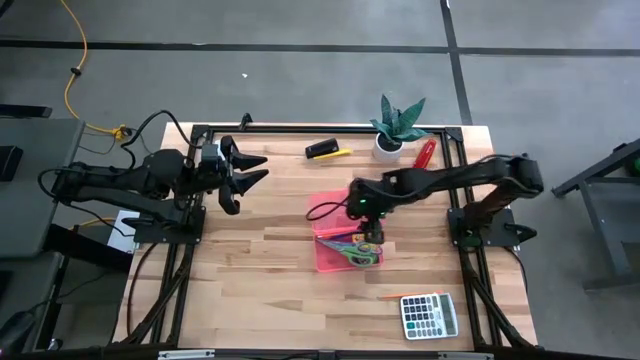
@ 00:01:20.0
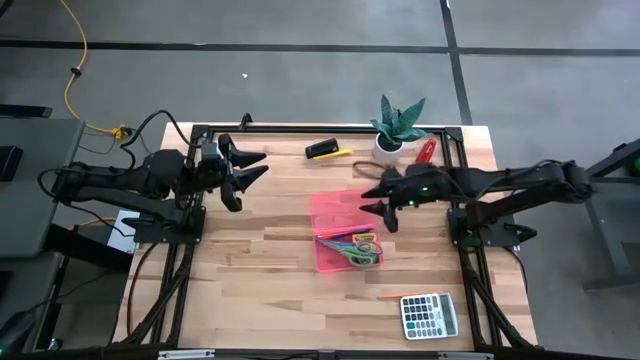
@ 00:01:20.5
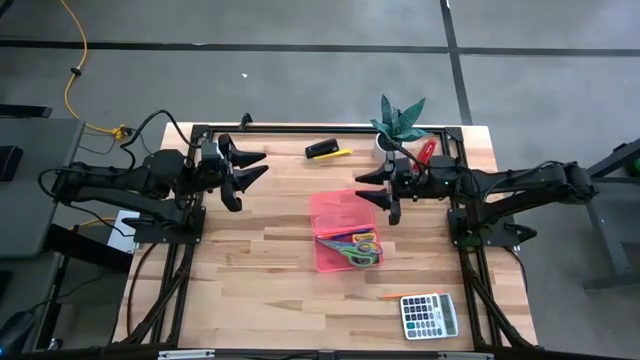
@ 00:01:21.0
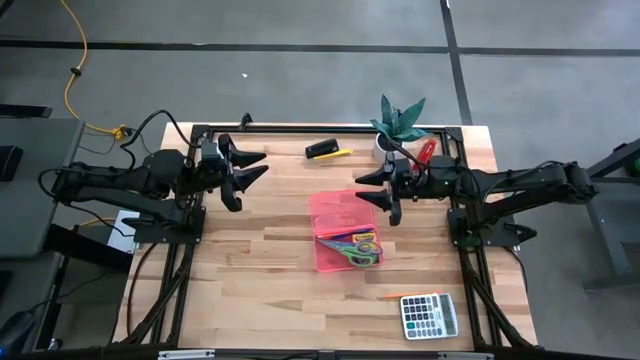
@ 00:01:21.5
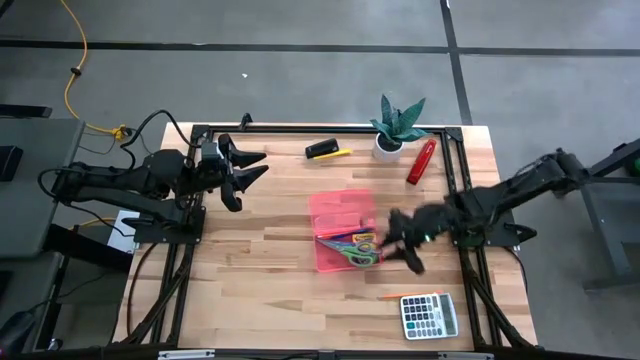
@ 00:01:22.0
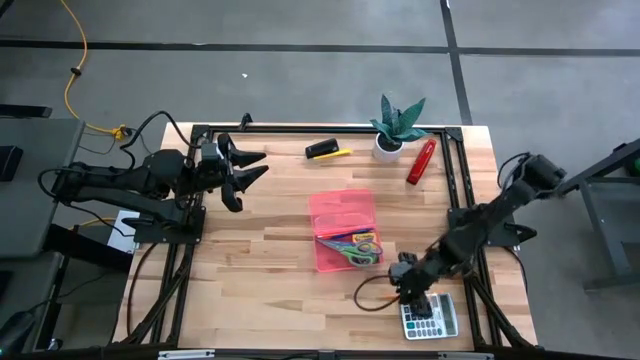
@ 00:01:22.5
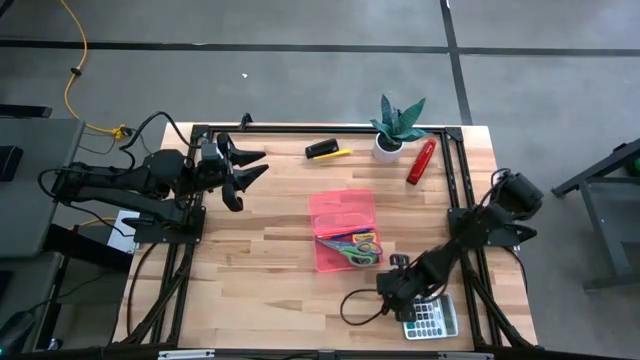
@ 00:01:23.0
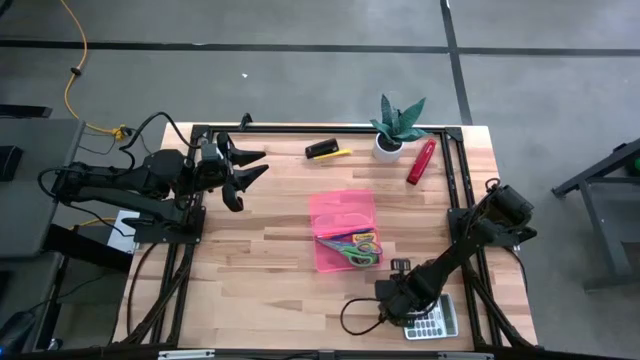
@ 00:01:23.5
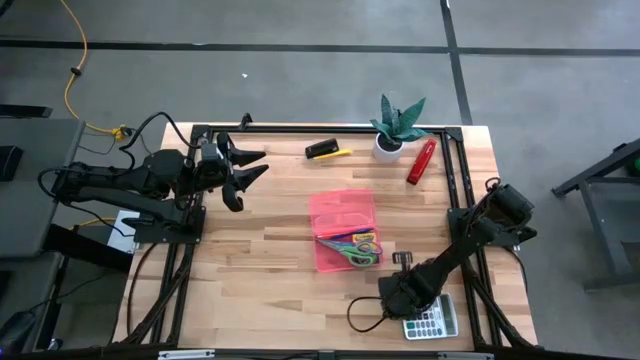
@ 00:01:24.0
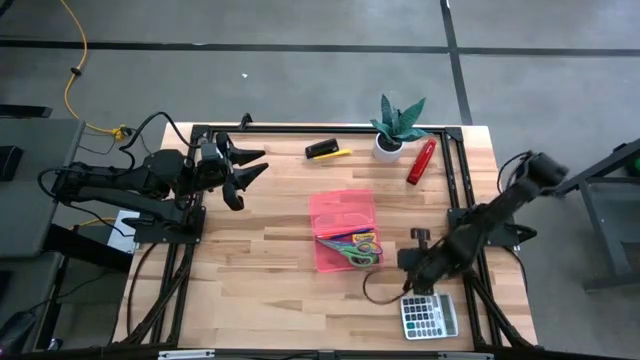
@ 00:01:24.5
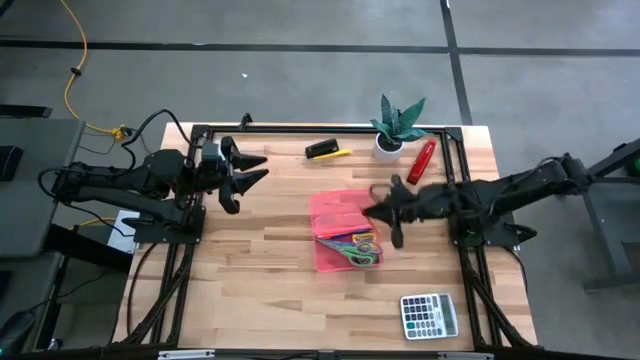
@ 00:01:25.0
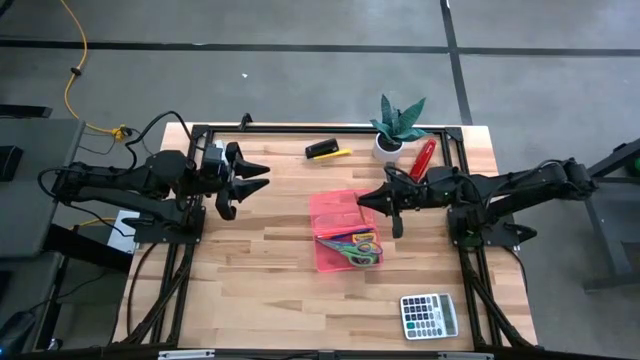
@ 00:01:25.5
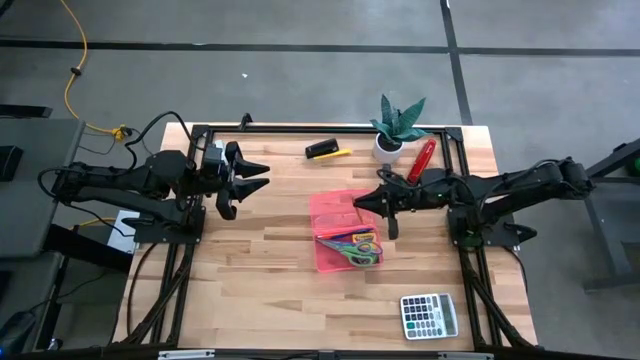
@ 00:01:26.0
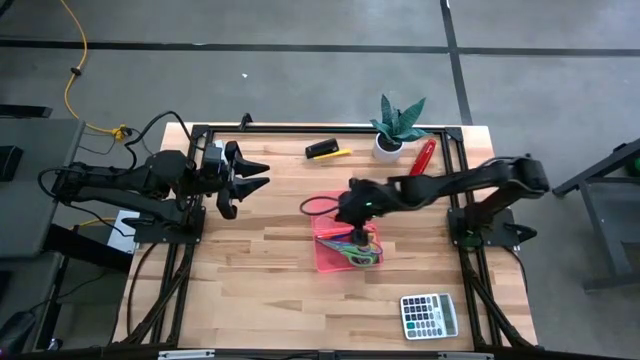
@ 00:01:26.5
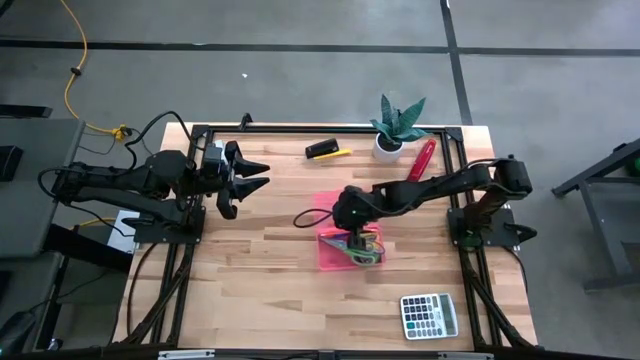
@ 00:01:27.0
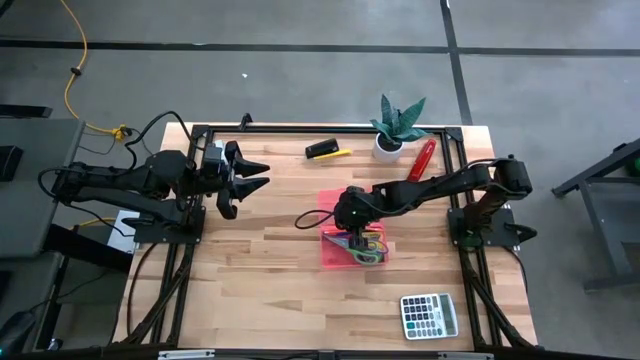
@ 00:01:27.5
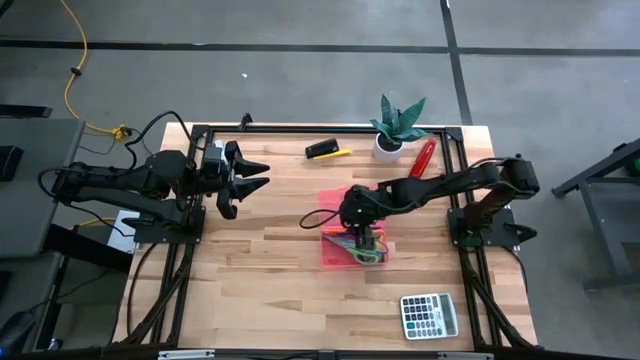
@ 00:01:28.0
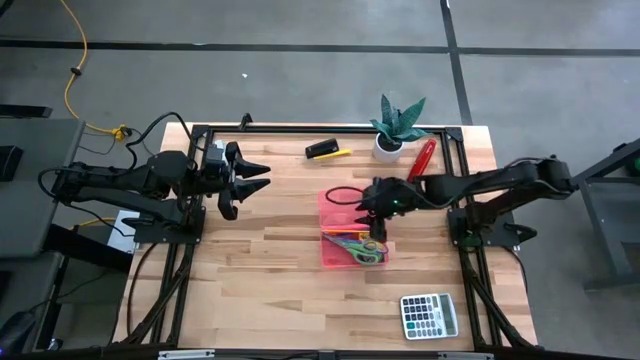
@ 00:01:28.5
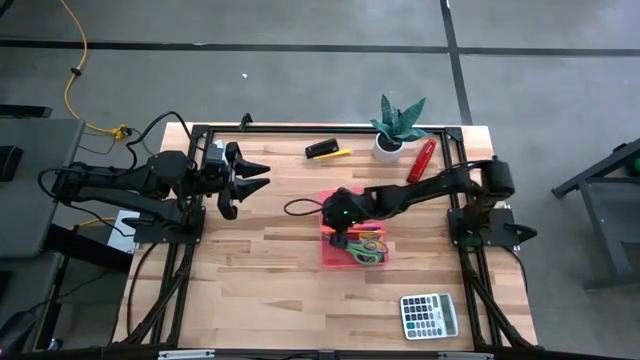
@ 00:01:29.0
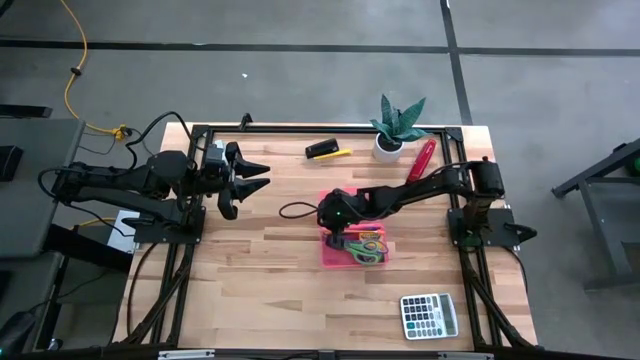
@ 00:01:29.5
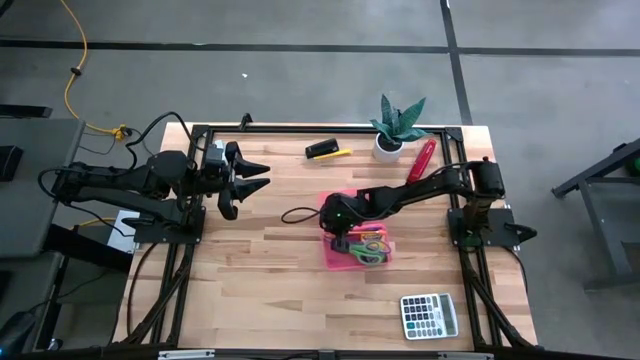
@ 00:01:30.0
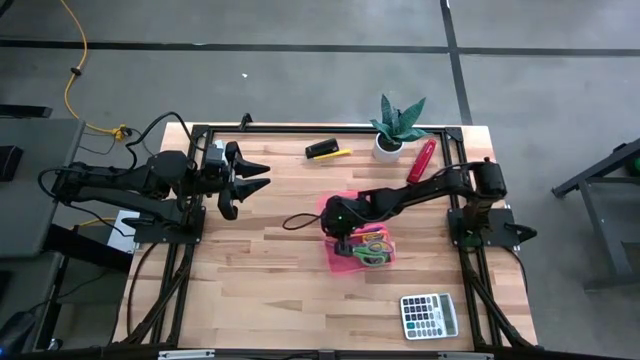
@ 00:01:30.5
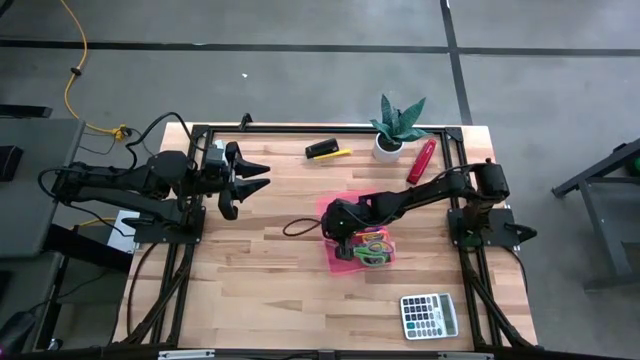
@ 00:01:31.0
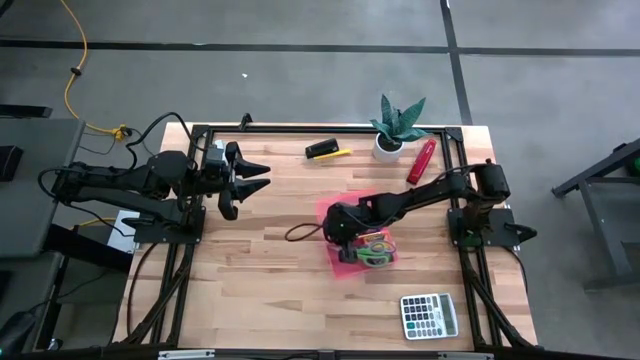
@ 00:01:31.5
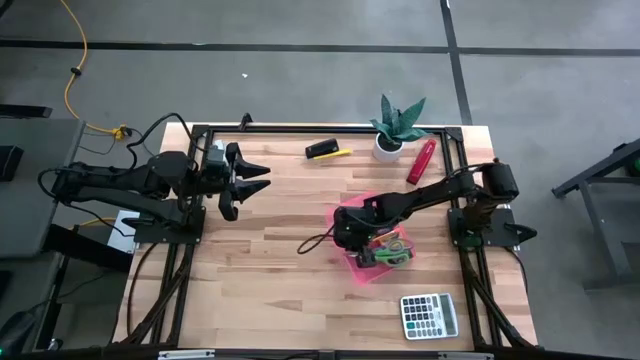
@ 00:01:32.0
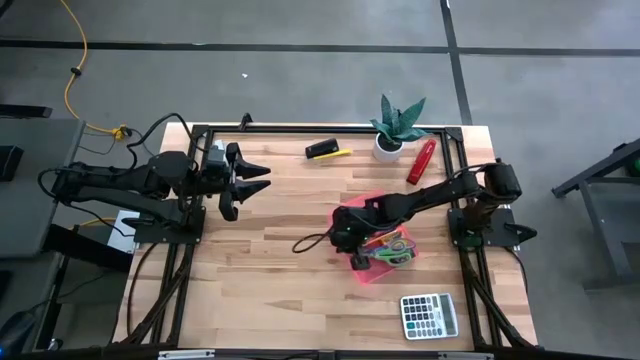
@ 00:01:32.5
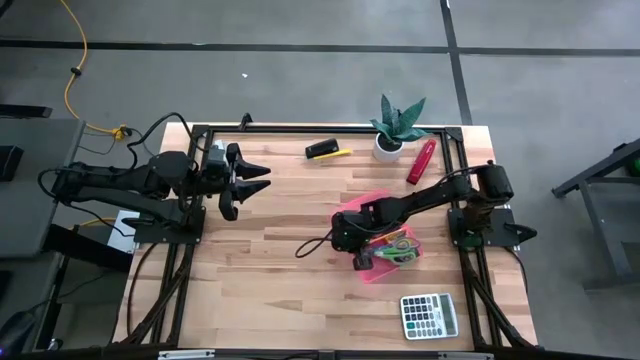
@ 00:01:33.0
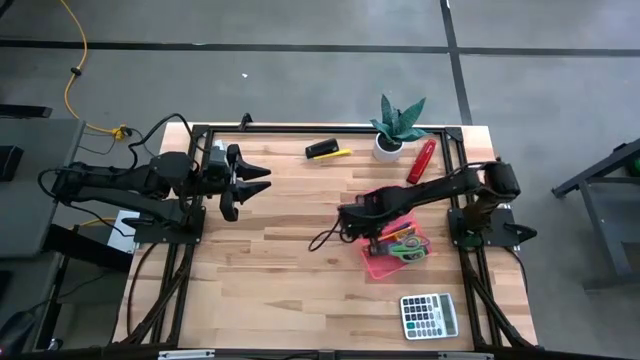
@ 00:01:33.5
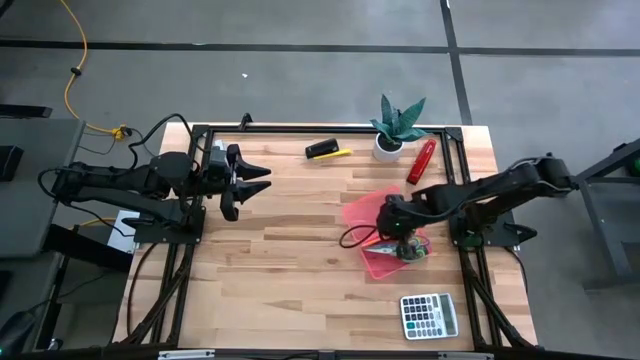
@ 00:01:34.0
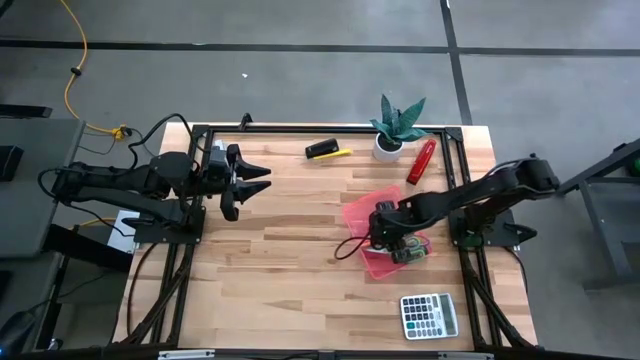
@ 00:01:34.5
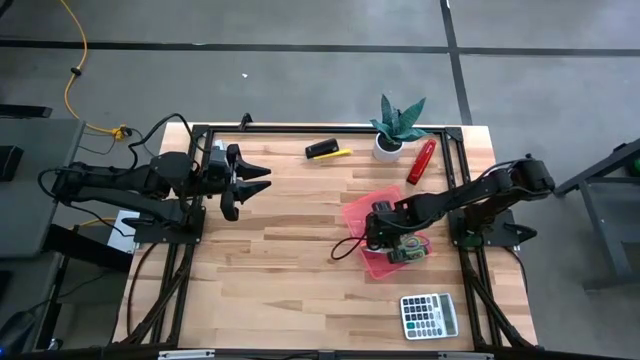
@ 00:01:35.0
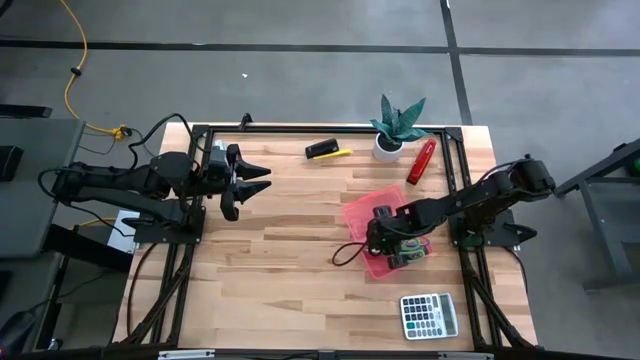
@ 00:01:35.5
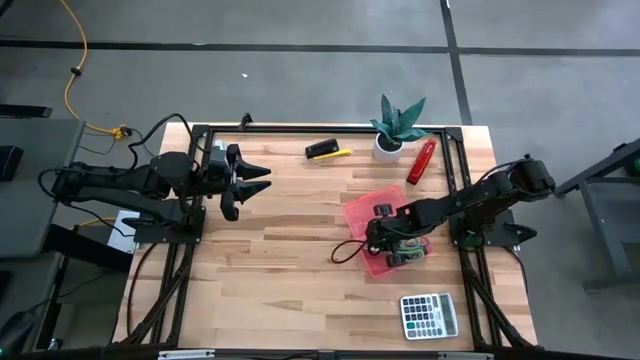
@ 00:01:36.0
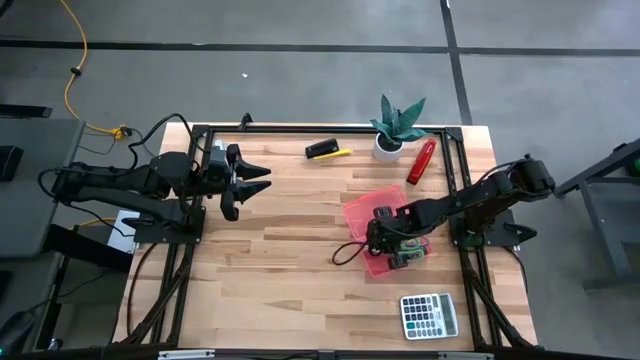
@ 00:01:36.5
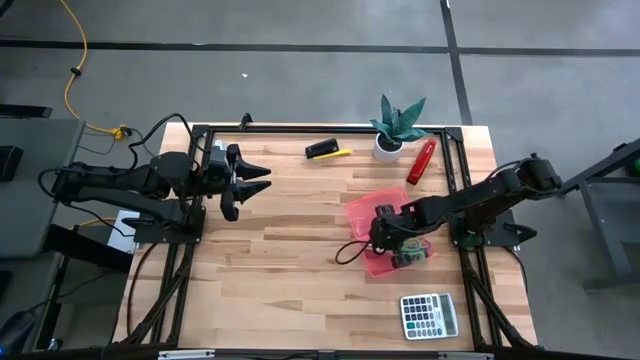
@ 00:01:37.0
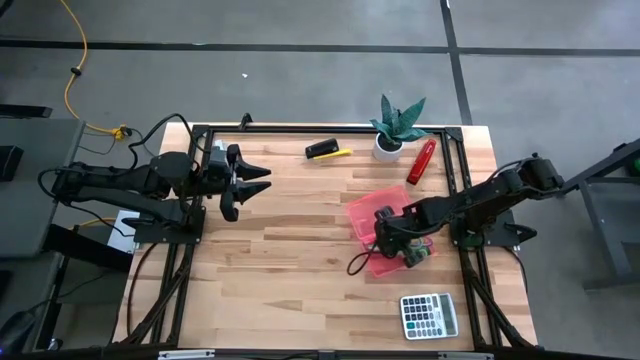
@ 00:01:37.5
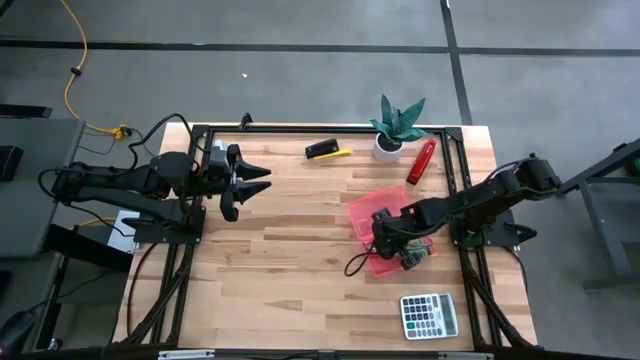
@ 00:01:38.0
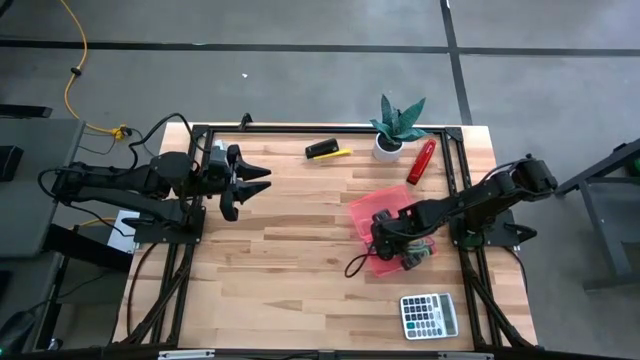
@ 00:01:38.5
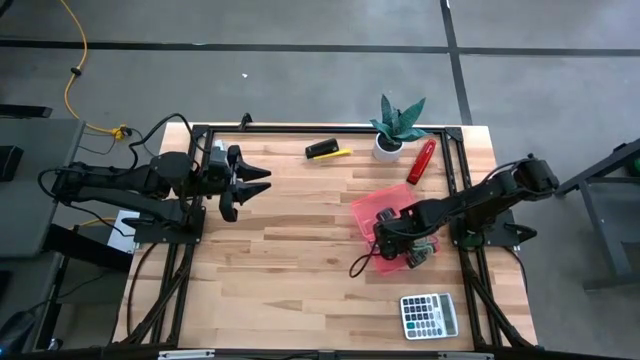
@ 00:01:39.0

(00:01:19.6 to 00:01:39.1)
Task: Pack school essentials
Put the orange pencil into the pink supply box

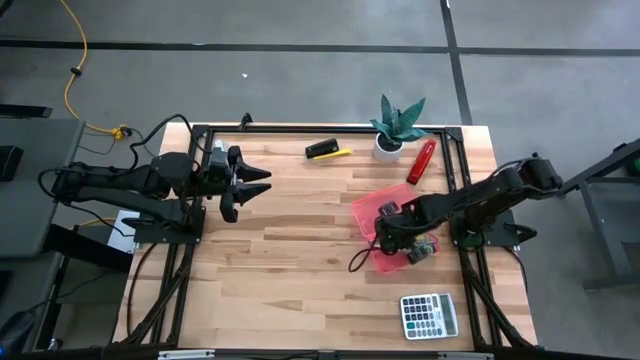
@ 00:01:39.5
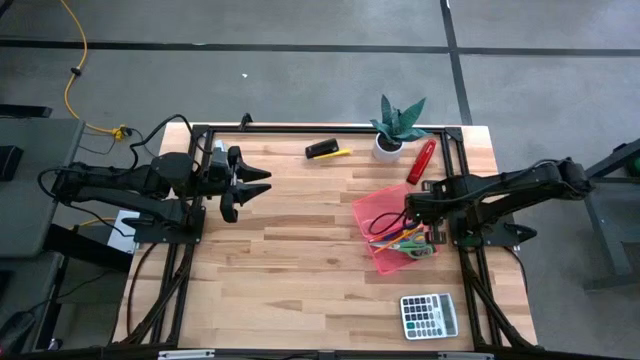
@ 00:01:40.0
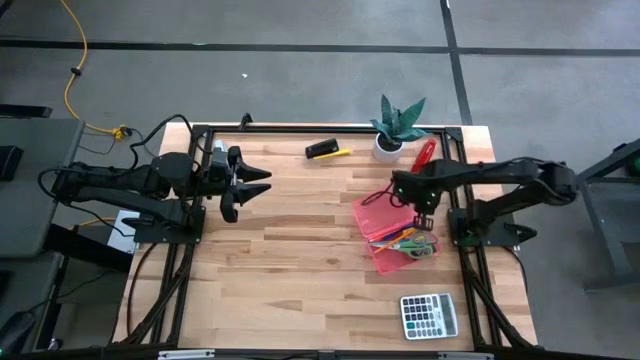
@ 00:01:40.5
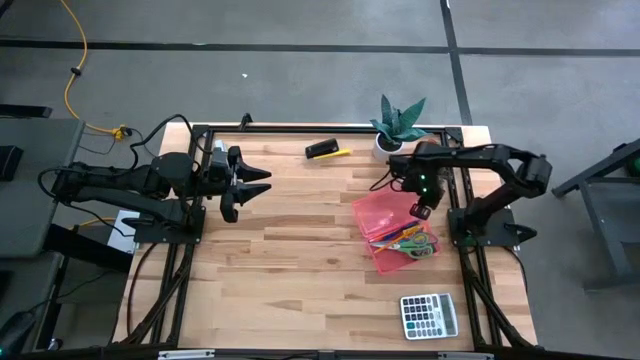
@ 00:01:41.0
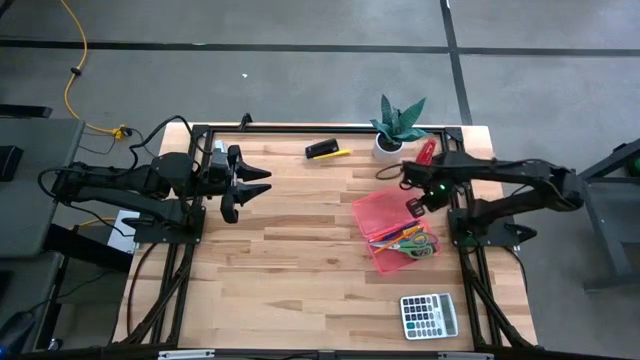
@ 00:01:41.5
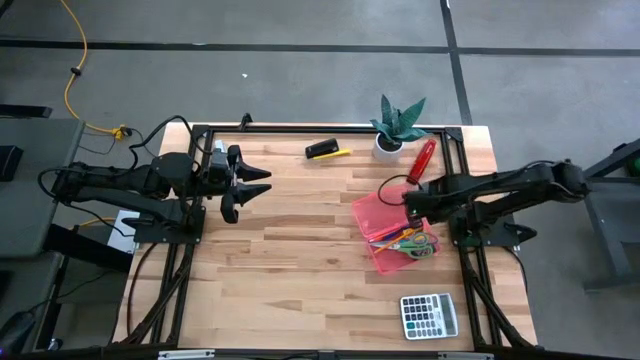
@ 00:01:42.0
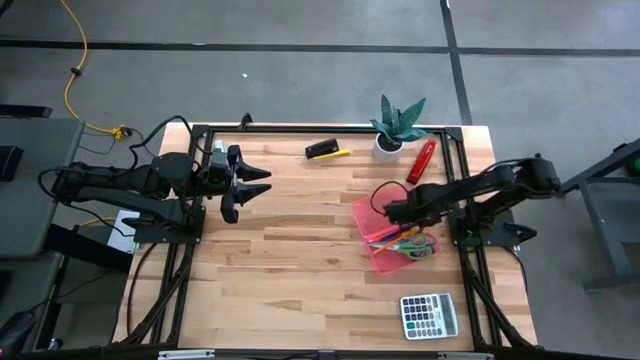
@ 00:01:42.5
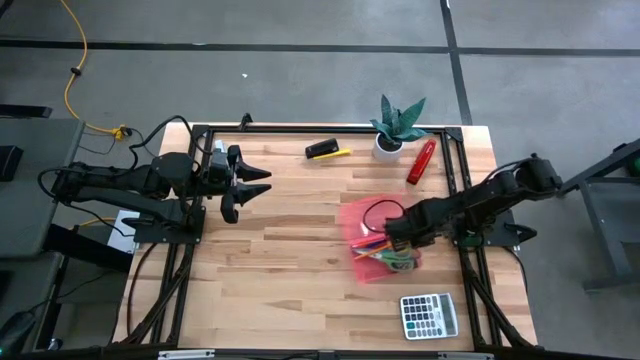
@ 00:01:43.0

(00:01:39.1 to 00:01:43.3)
Adjust the pink supply box
